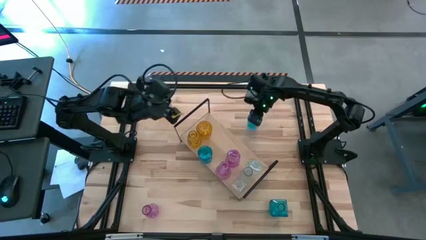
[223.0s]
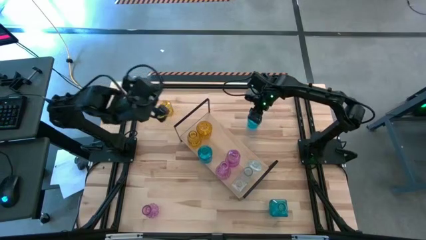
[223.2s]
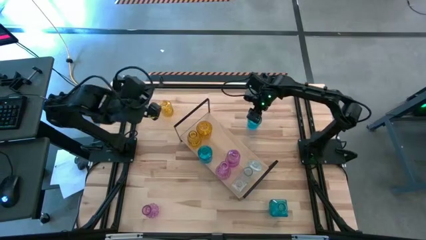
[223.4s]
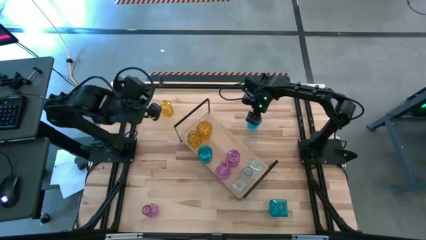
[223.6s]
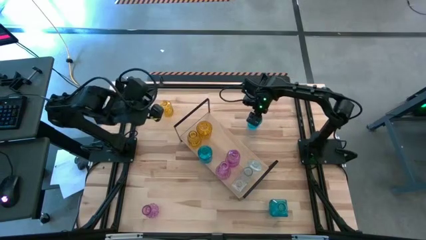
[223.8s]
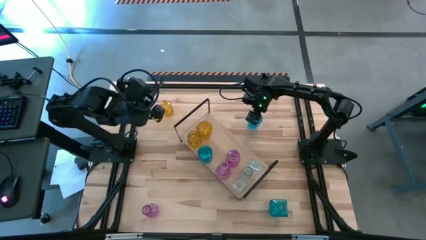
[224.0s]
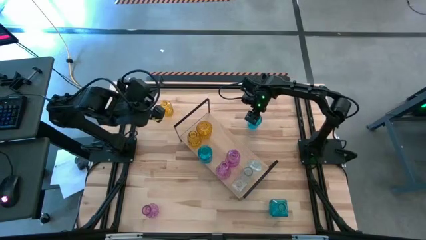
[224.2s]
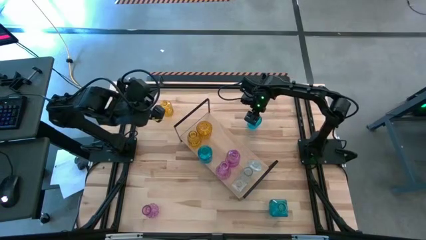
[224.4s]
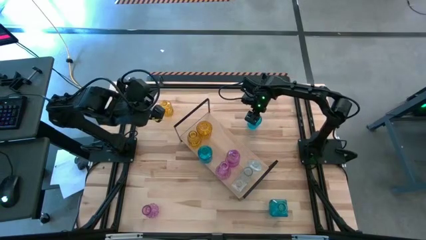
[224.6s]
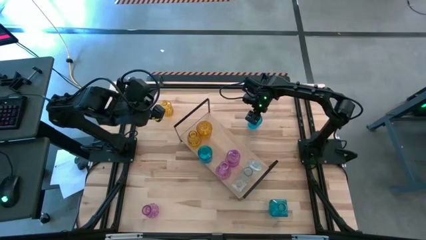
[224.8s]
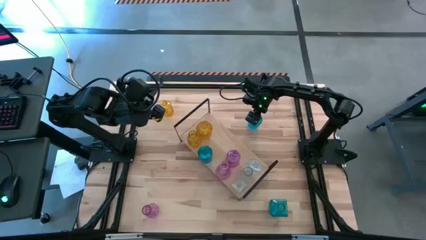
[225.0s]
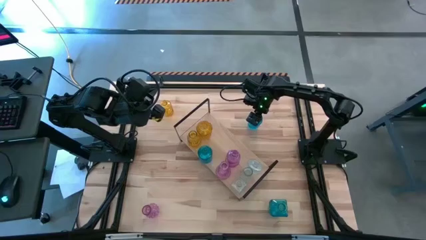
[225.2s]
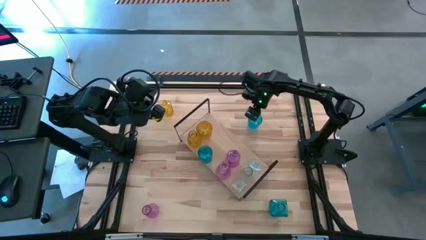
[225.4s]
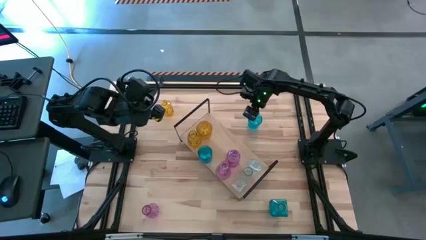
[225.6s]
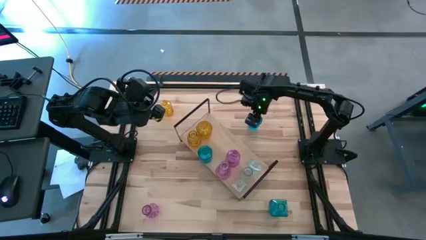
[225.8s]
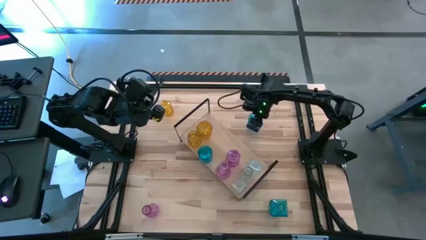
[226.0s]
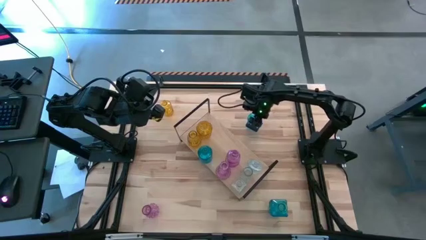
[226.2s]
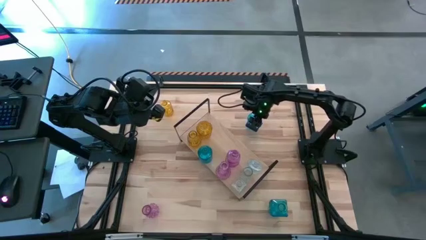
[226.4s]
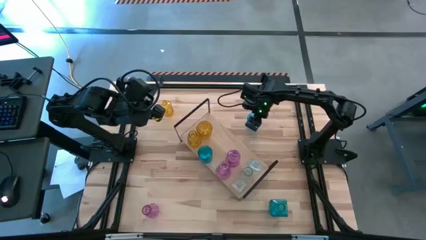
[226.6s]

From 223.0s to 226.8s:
Task: sort vases onto shelf
Put the top blue crystal vase on the shelf

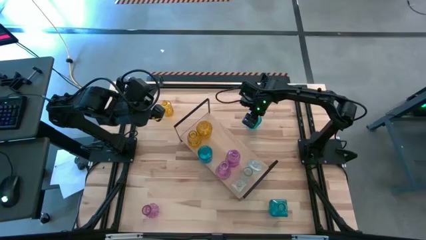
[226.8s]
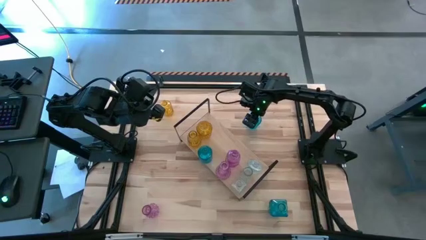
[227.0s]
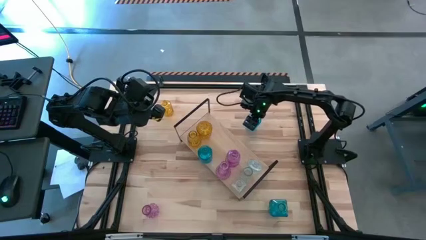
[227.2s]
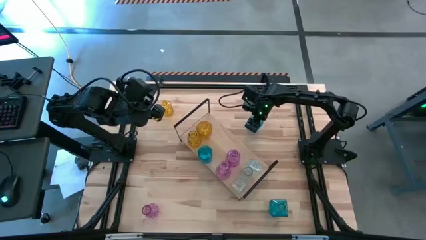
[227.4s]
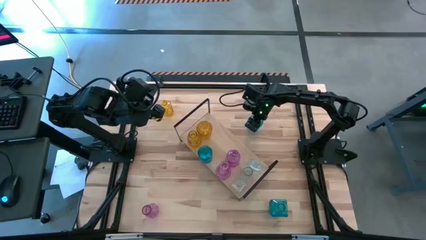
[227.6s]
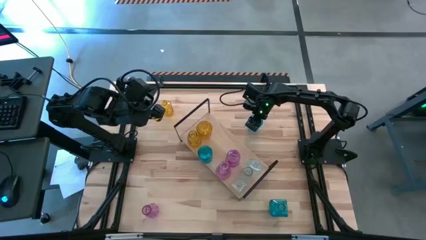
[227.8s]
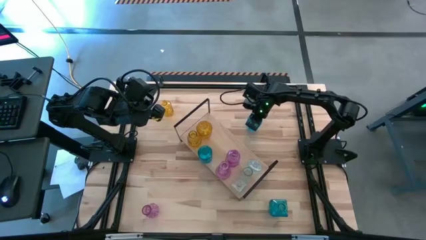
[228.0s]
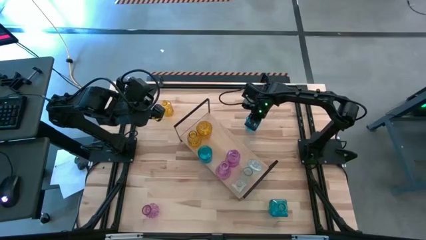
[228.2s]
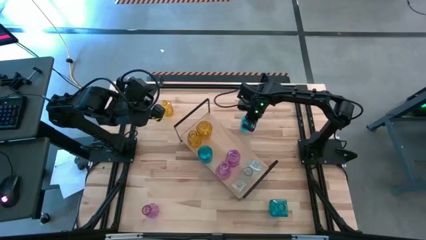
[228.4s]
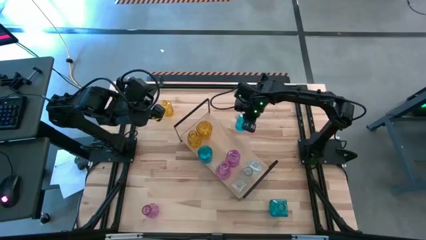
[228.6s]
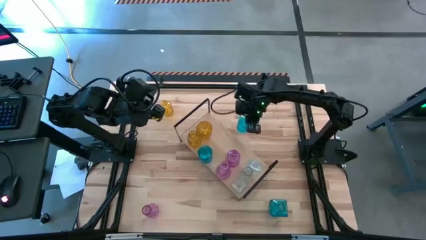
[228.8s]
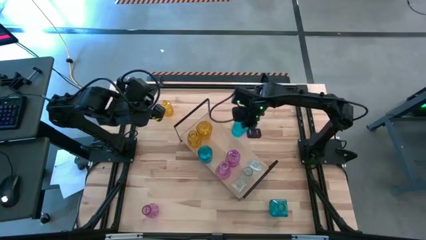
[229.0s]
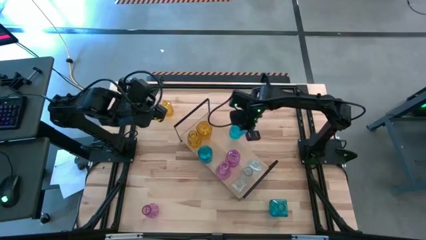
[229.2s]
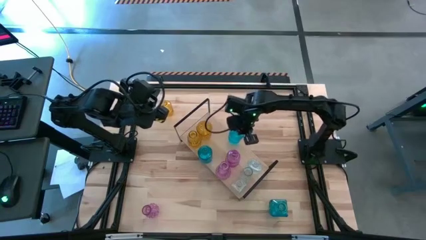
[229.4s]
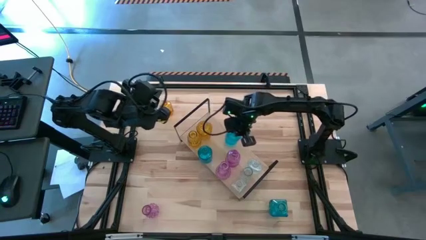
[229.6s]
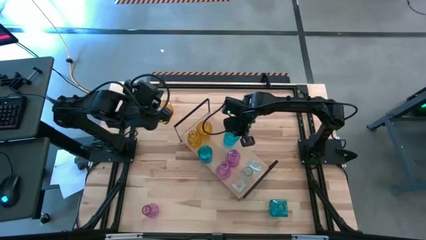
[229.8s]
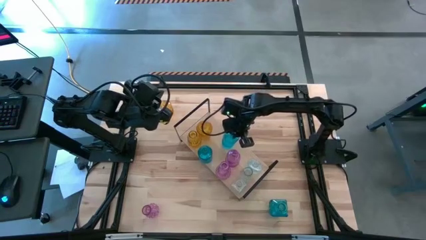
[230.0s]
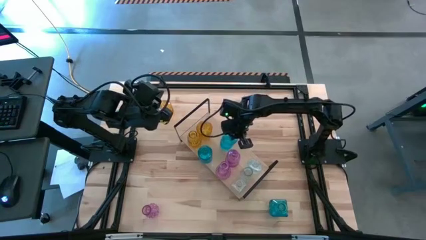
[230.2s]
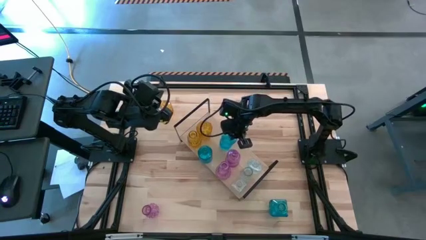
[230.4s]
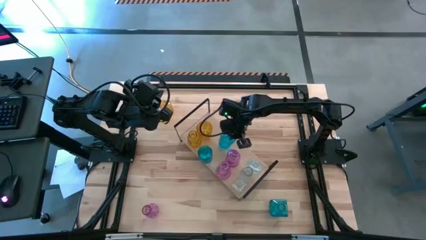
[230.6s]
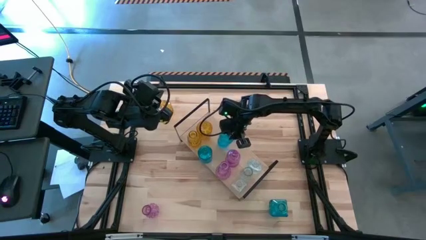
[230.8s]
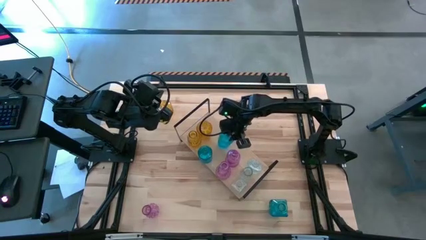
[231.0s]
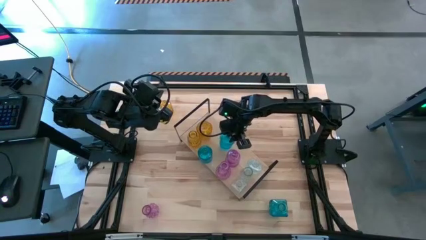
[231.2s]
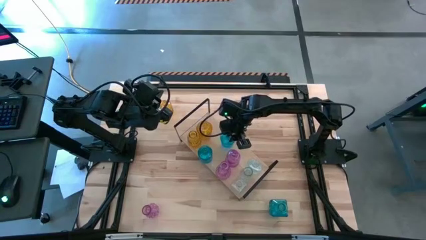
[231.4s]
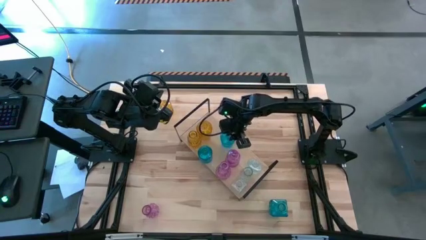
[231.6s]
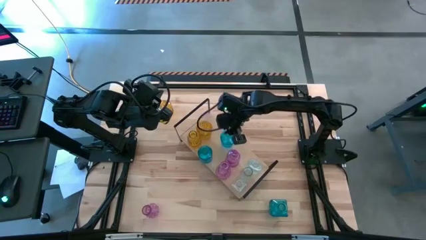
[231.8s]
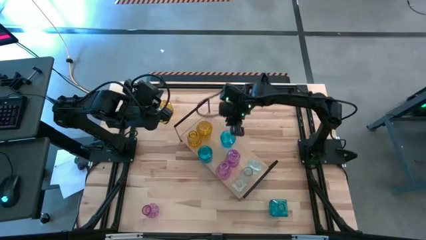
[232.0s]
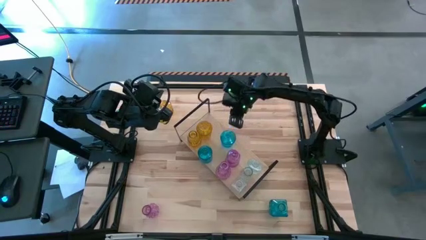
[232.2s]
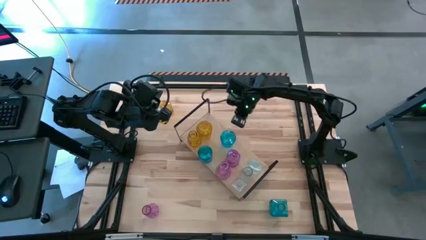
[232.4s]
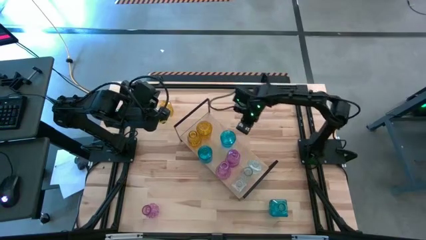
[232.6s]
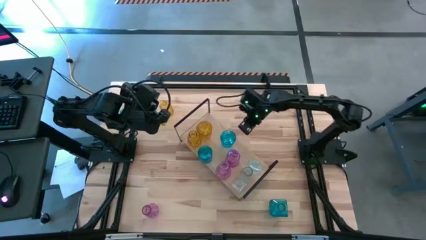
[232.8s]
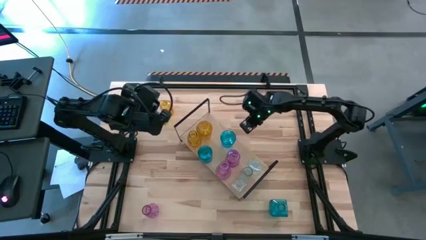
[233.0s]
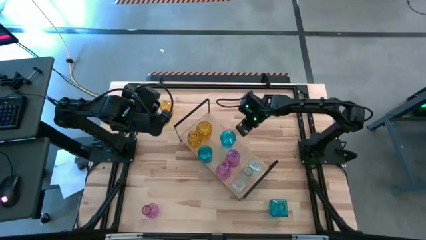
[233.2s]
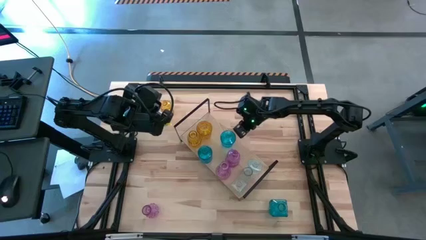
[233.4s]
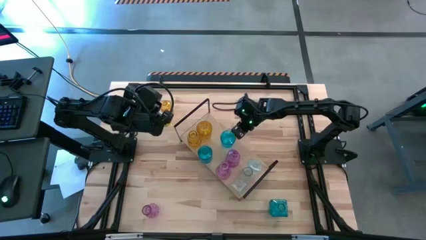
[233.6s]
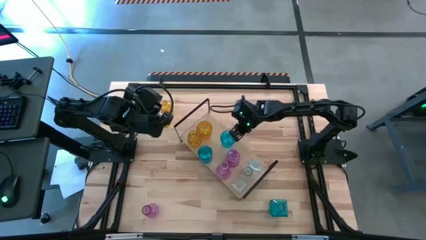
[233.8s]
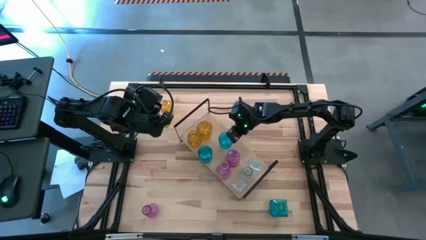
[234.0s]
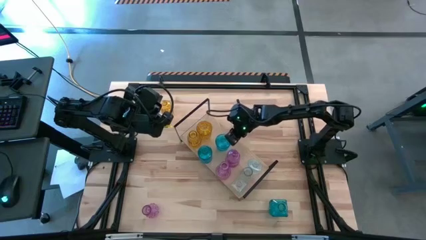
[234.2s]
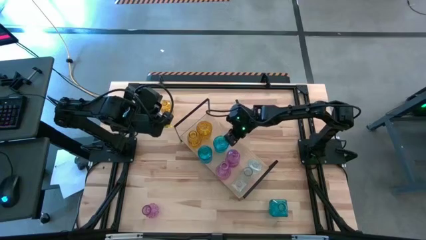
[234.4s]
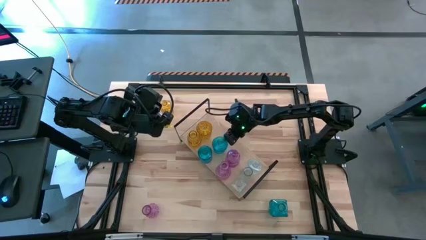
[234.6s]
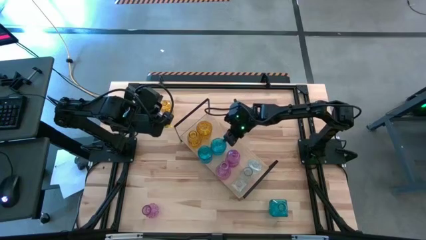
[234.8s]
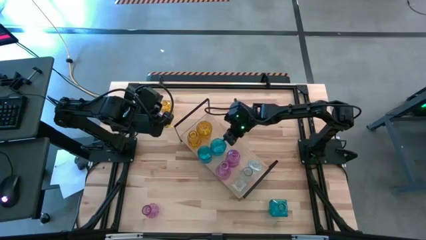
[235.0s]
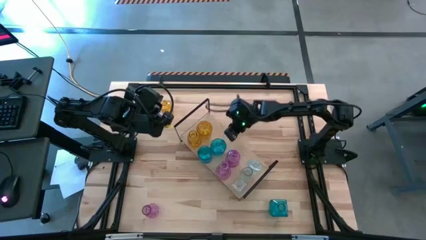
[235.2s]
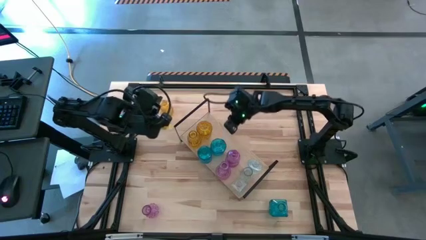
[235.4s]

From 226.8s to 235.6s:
Put the top blue crystal vase on the shelf
